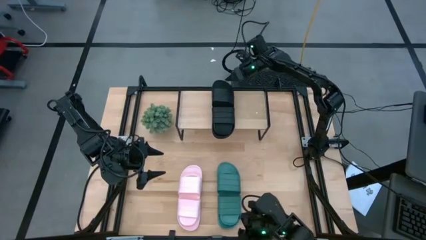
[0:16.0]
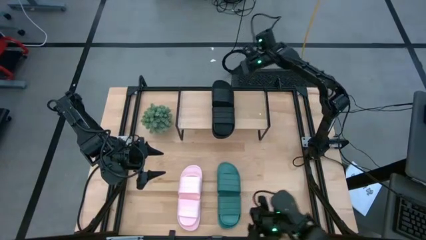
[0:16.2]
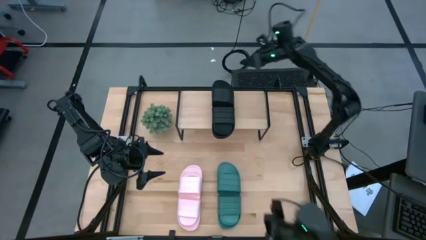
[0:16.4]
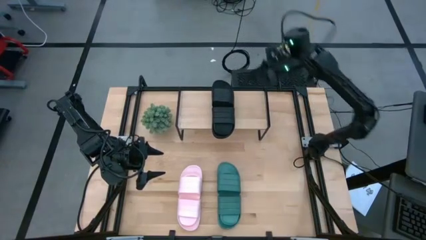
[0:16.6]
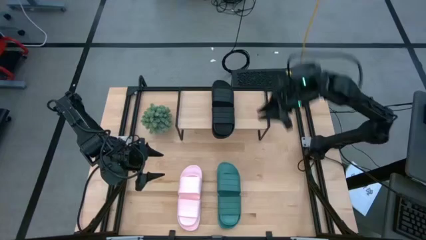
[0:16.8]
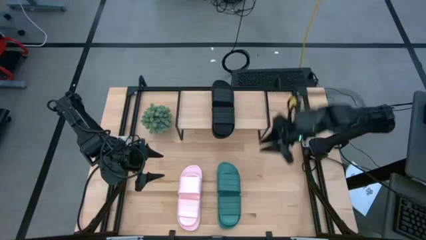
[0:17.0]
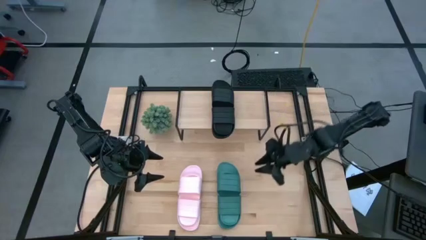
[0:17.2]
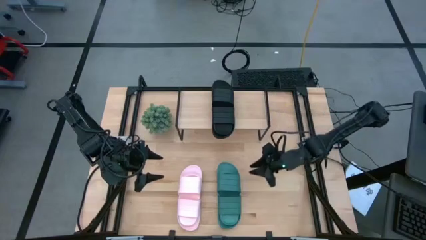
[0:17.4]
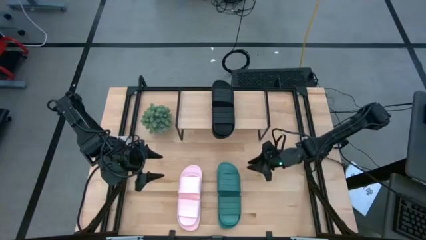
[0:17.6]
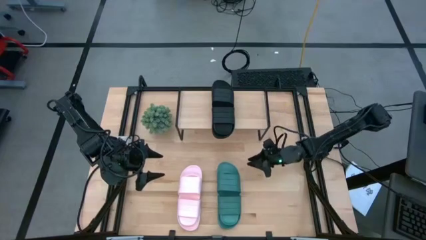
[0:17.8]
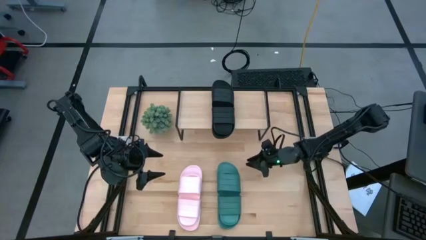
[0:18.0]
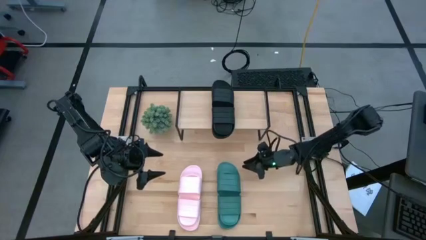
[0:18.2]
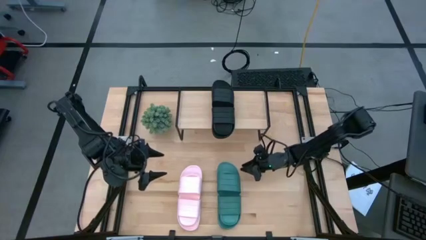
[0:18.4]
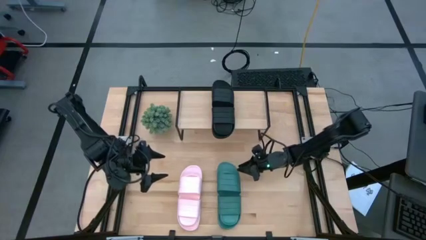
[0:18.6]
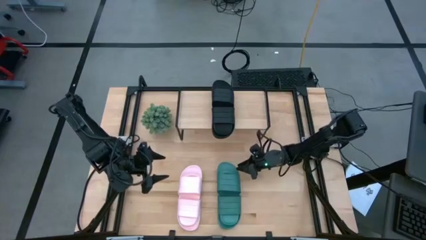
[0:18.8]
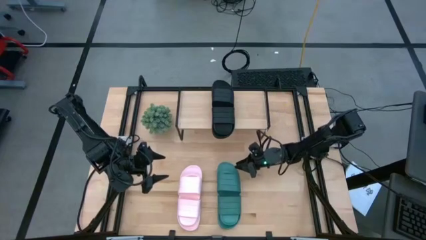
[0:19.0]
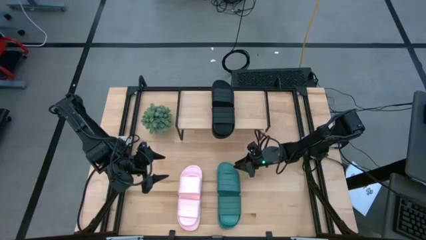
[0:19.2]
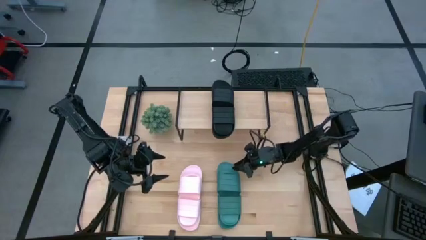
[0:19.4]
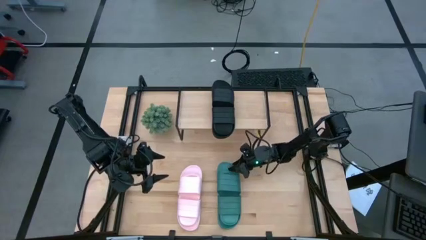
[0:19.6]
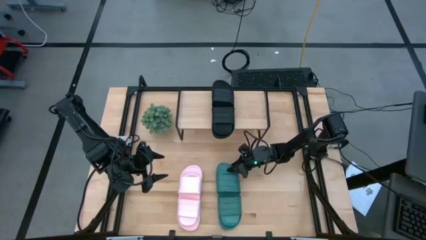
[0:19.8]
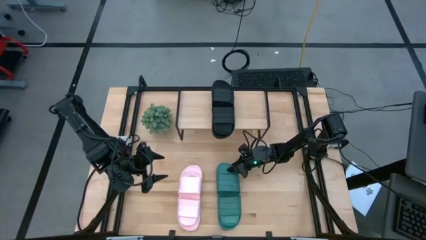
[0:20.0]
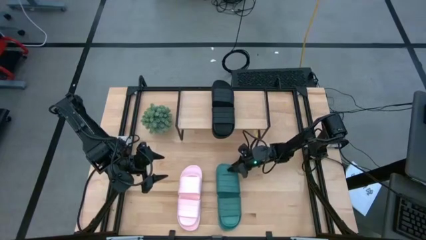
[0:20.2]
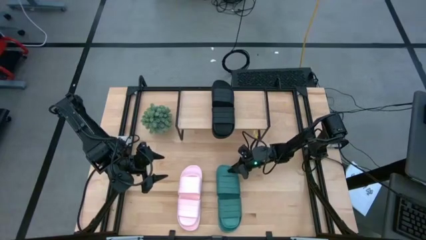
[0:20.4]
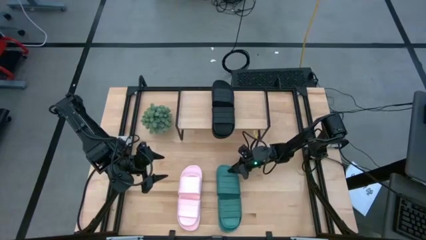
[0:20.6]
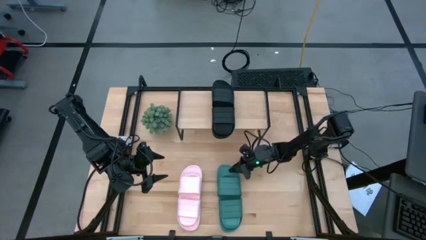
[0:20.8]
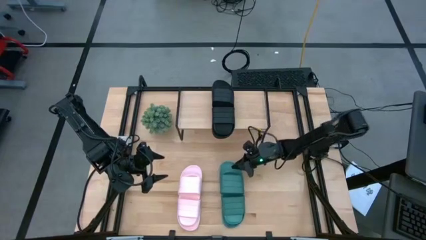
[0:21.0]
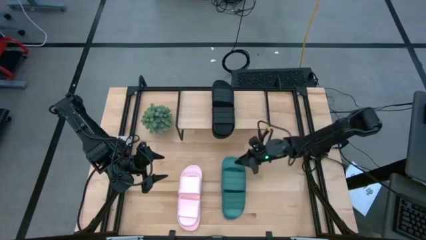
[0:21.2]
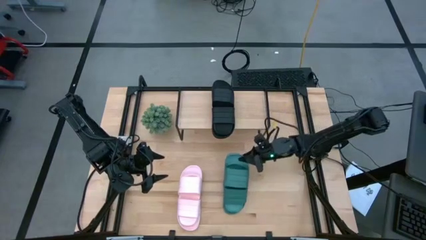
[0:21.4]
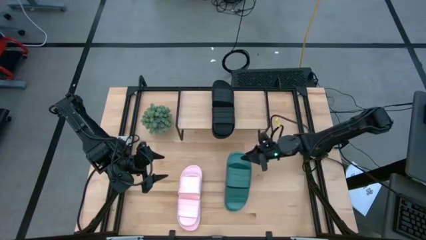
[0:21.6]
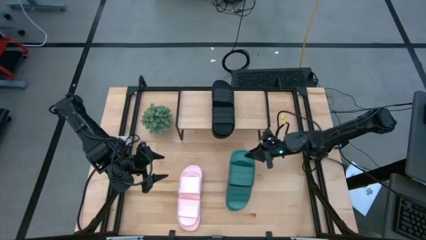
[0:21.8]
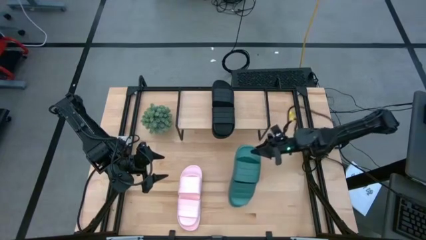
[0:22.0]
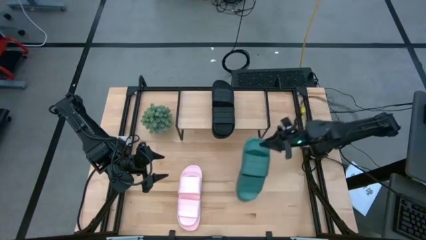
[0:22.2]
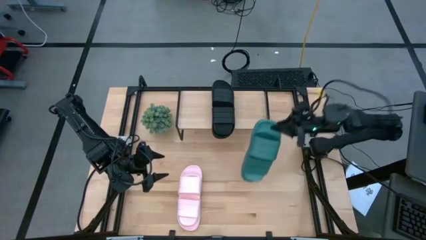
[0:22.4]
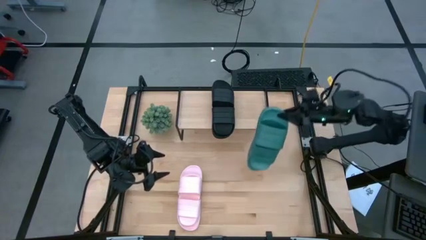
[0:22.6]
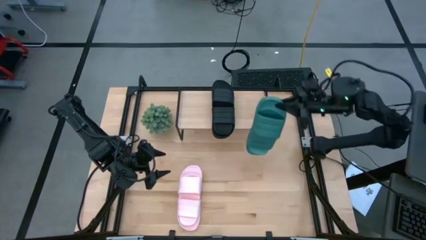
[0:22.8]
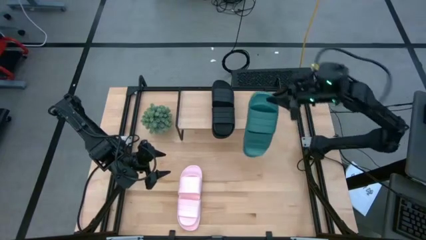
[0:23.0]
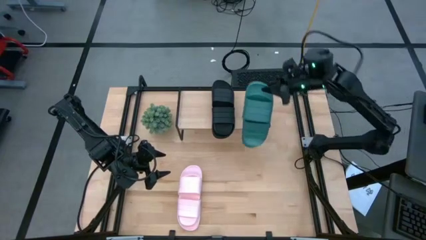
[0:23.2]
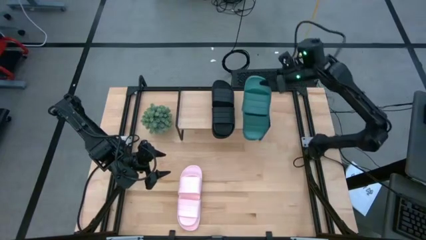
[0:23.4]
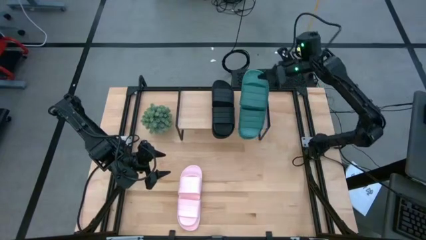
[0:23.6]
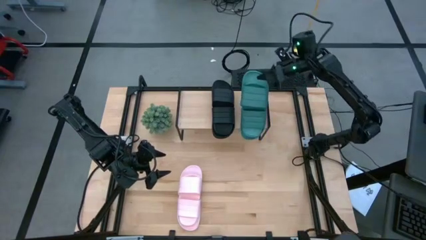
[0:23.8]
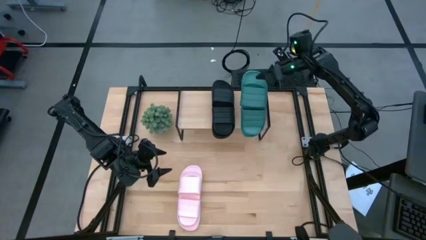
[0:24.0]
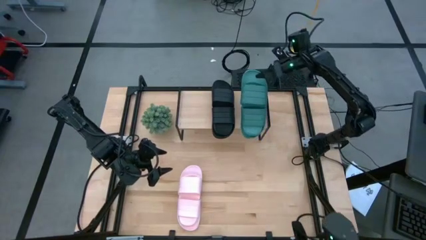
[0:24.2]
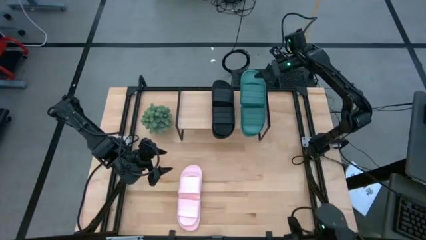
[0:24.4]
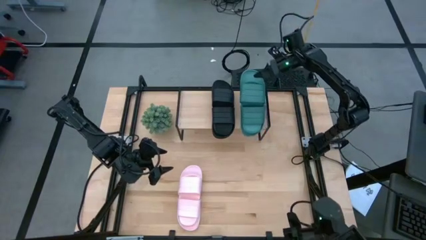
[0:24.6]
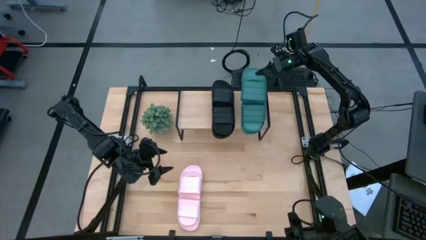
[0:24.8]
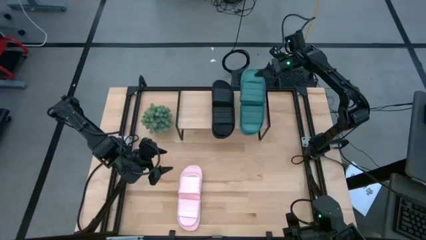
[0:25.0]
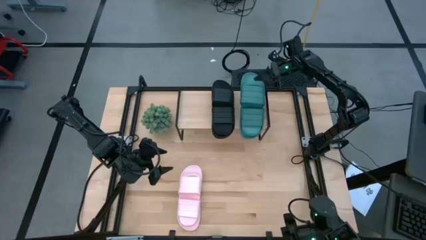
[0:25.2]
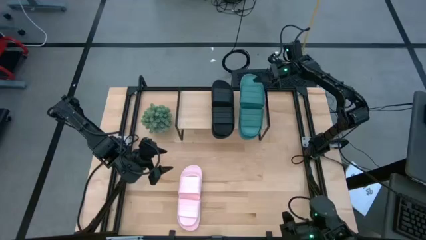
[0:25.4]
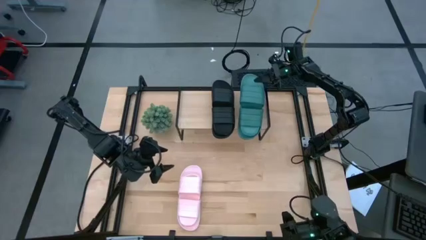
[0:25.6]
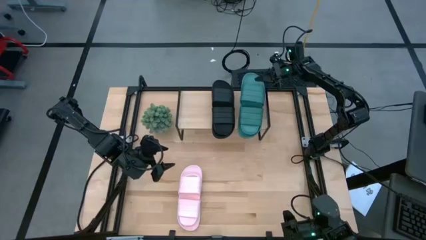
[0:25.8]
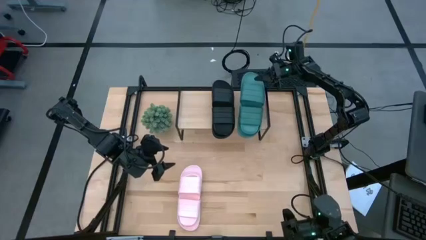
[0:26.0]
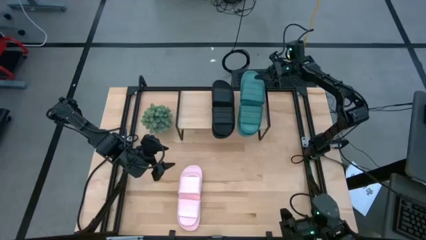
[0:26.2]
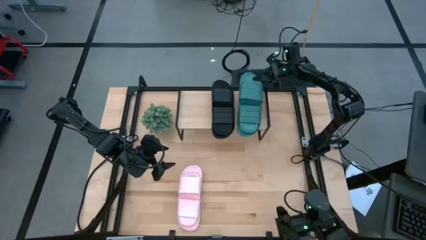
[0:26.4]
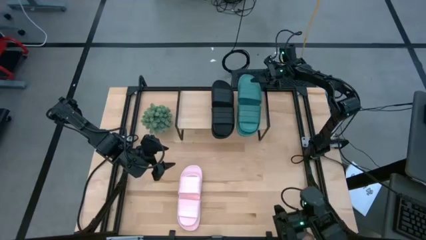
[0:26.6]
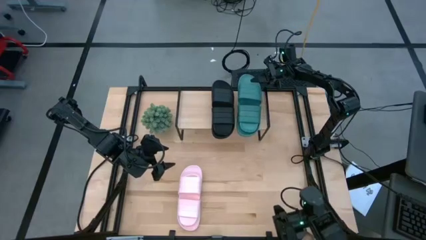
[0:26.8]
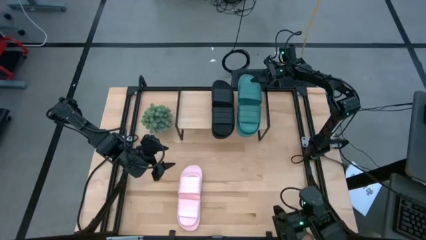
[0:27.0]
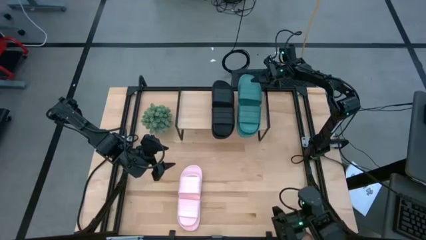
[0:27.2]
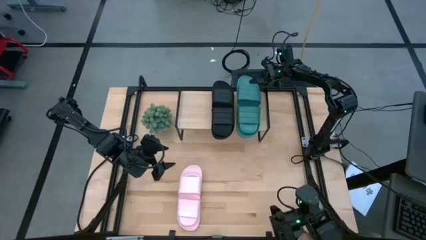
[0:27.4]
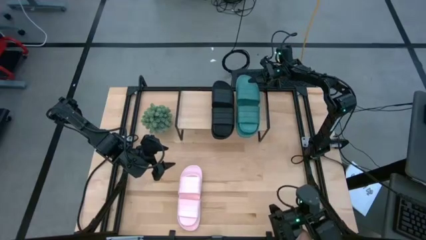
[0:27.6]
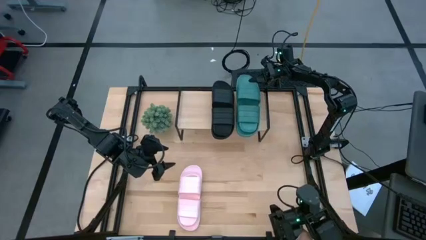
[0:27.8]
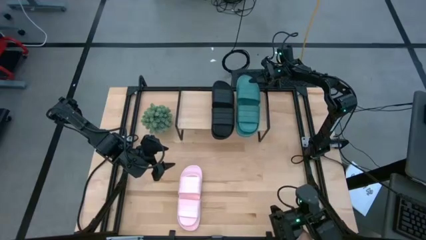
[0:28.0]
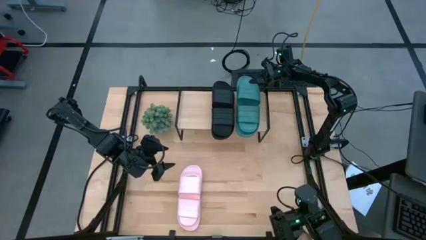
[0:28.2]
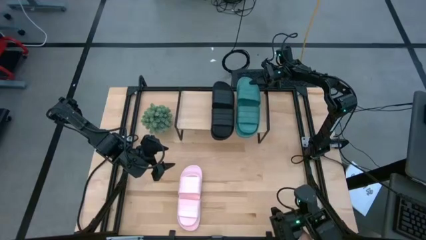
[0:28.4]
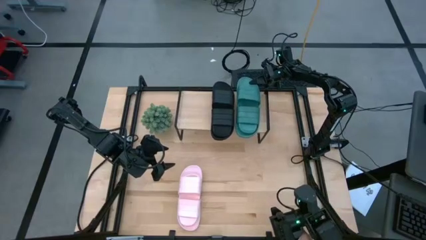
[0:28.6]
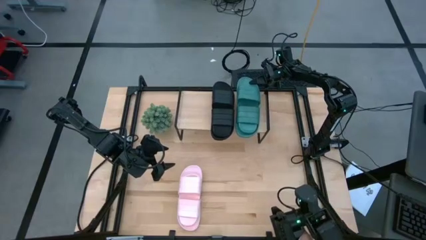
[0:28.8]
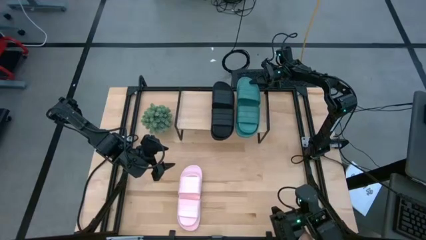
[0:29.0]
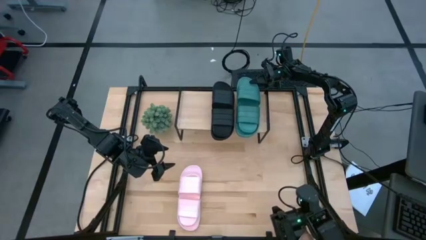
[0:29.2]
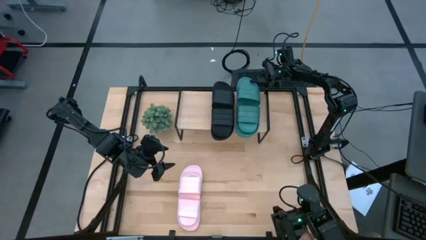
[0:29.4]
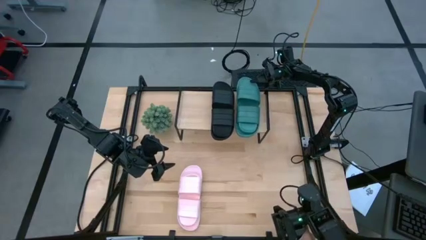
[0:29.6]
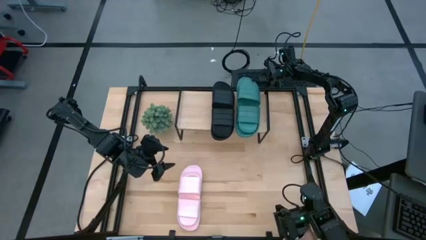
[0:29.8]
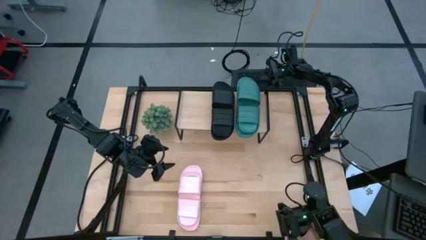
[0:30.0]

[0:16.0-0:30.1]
Task: Pick and place slides into the shelf
Put the green slippers on the shelf
